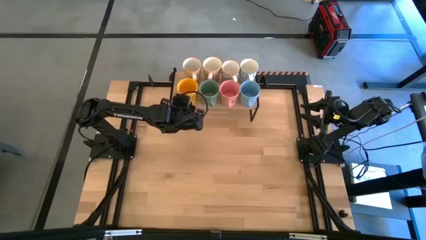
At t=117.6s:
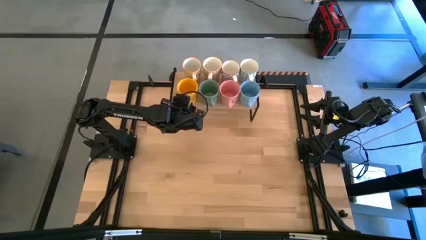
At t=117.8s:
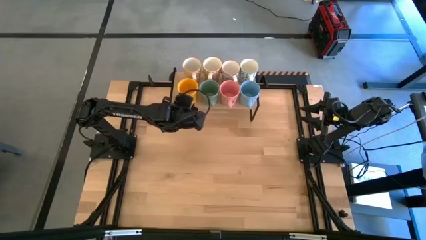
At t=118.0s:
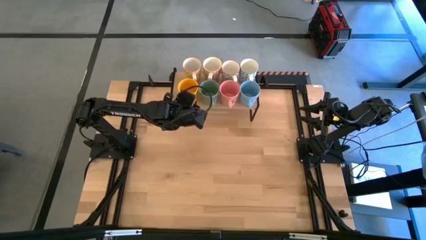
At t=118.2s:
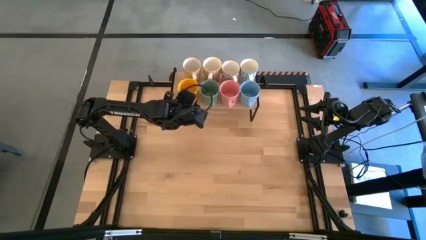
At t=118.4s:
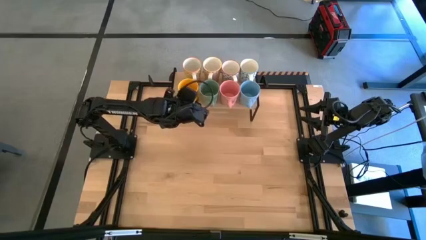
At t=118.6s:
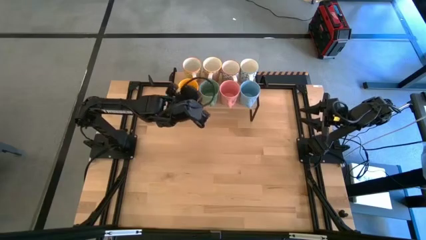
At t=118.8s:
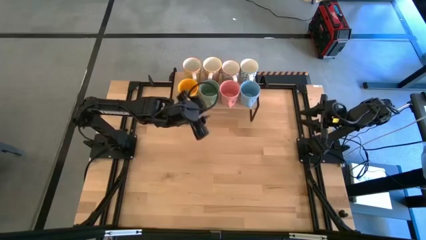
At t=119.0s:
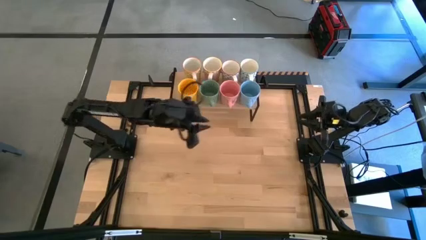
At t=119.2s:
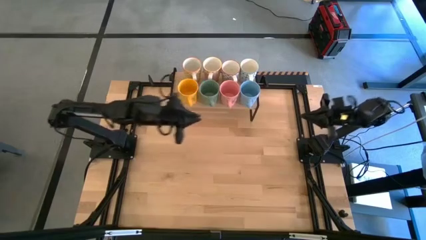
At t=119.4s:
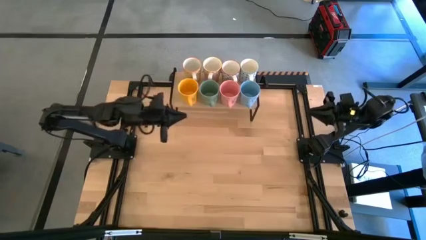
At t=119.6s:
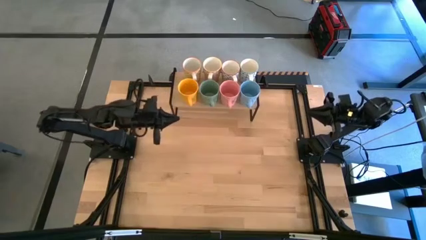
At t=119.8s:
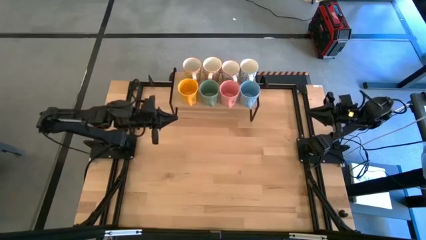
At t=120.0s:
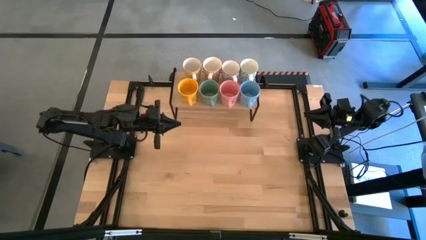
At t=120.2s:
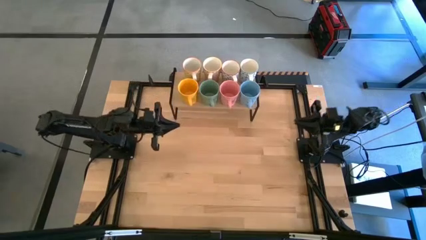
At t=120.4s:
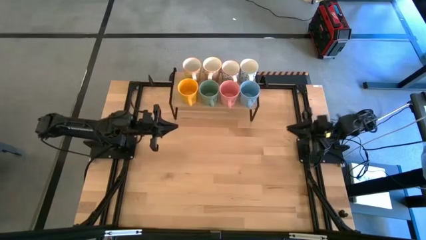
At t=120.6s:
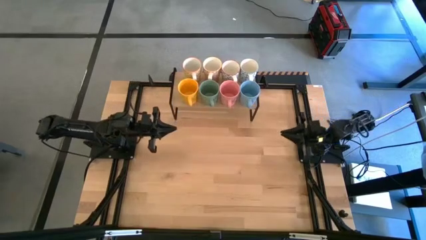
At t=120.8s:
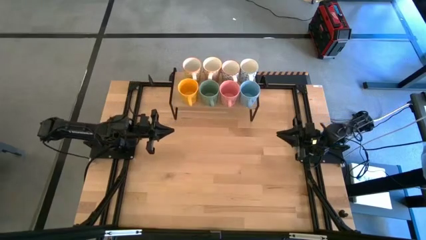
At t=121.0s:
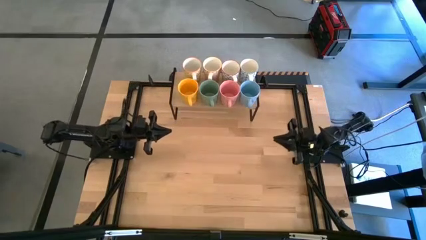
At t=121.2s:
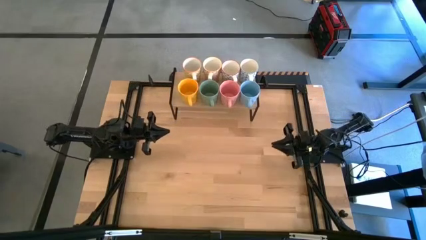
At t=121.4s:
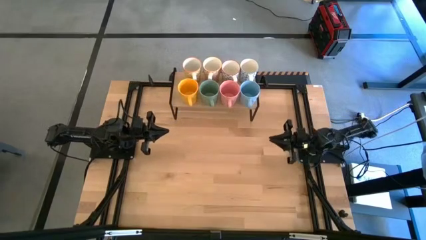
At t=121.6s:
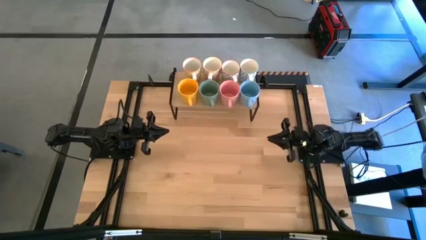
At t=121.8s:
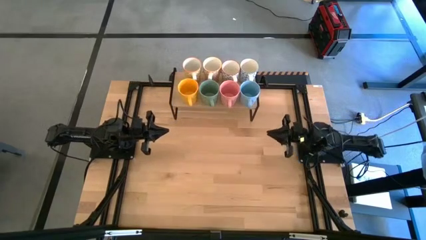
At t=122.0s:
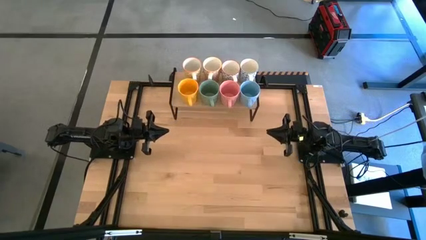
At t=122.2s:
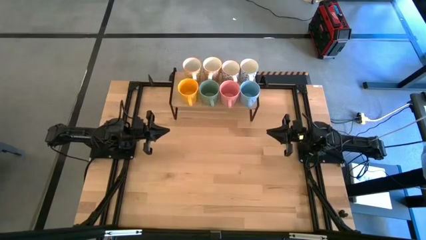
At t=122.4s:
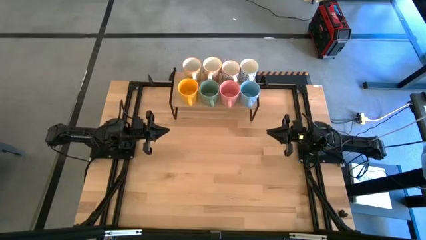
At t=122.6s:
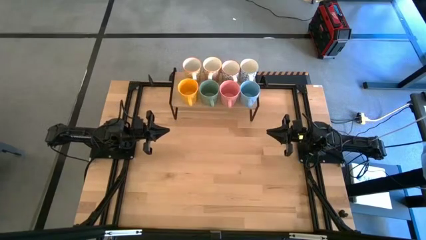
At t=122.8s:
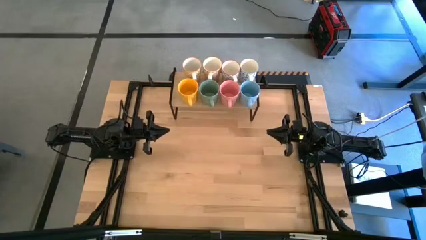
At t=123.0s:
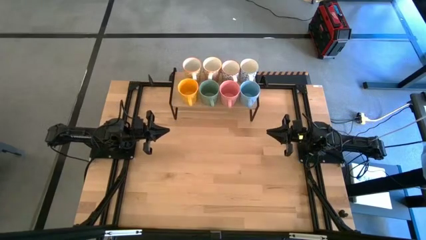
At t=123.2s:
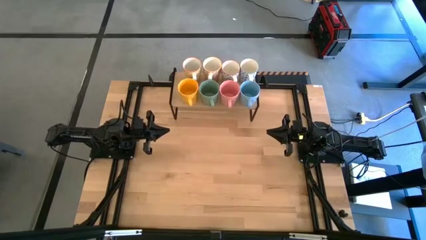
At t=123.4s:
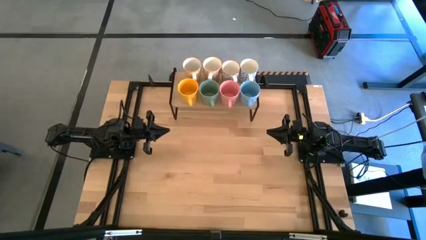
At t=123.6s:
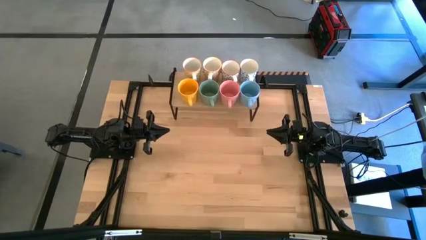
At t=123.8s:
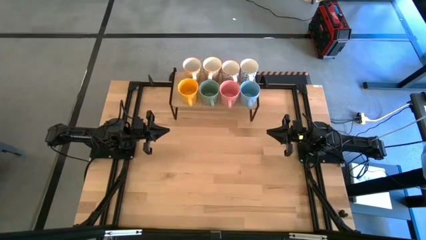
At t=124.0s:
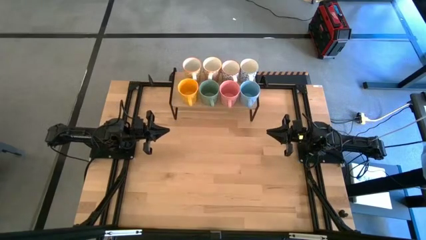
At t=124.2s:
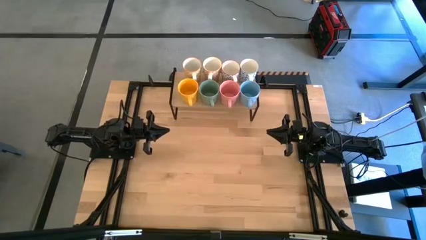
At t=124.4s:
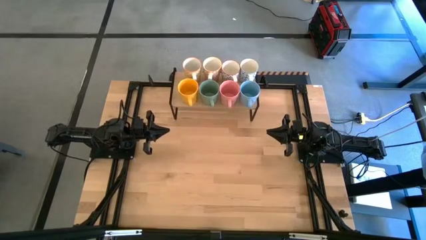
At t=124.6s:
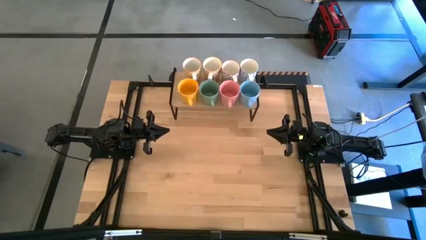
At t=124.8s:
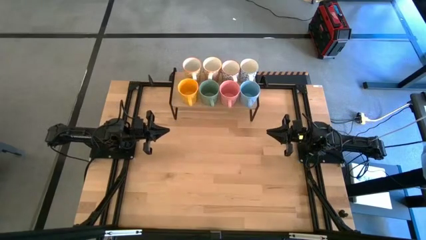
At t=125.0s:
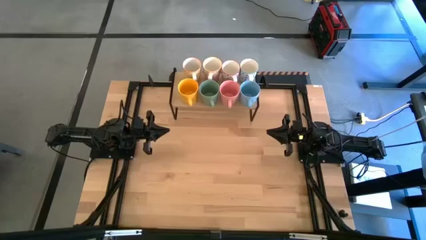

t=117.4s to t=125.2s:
Task: Place coffee mugs
Return to Home Position

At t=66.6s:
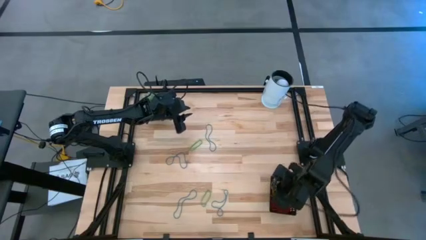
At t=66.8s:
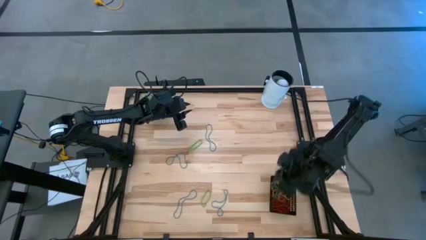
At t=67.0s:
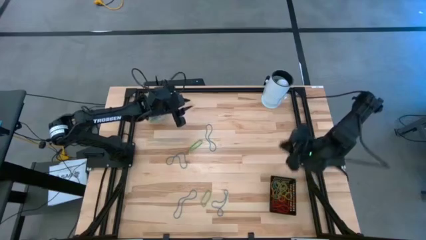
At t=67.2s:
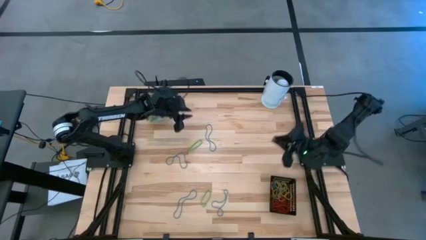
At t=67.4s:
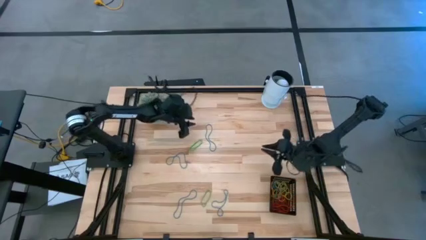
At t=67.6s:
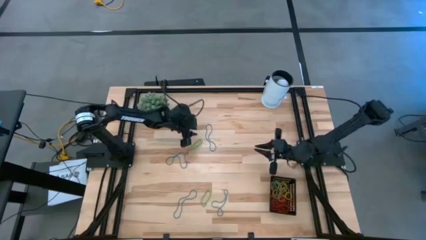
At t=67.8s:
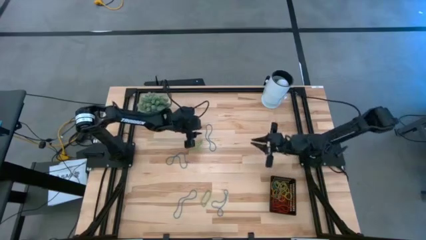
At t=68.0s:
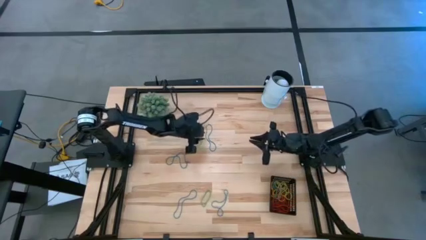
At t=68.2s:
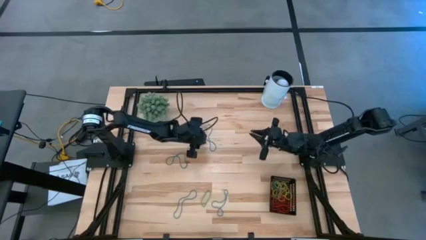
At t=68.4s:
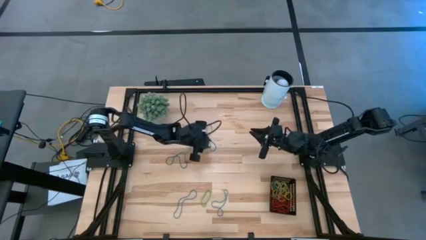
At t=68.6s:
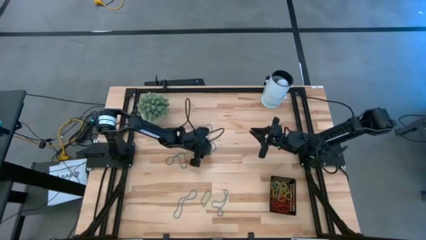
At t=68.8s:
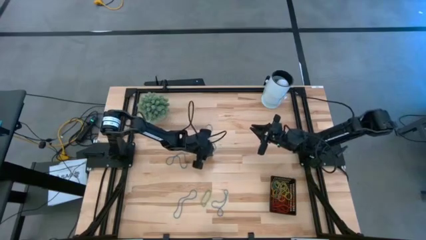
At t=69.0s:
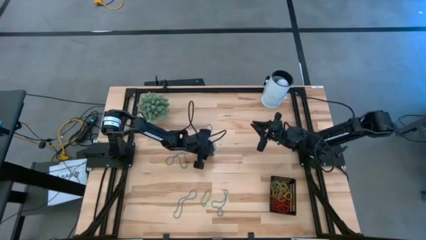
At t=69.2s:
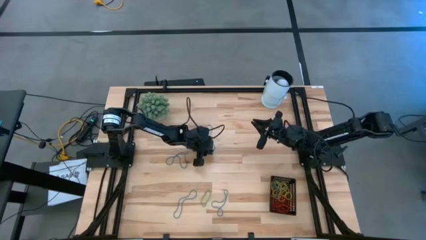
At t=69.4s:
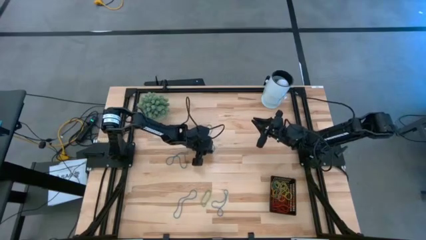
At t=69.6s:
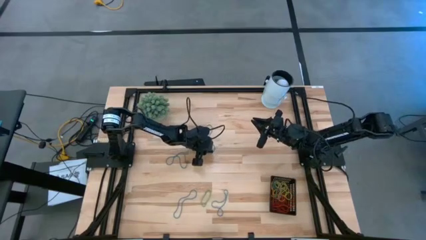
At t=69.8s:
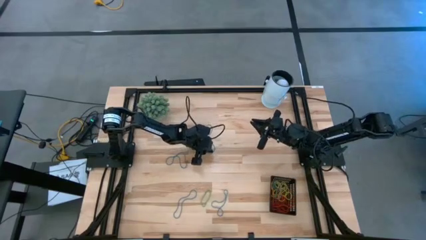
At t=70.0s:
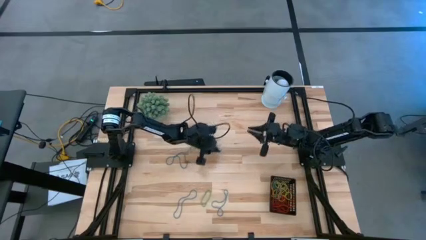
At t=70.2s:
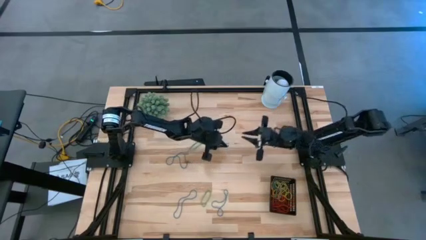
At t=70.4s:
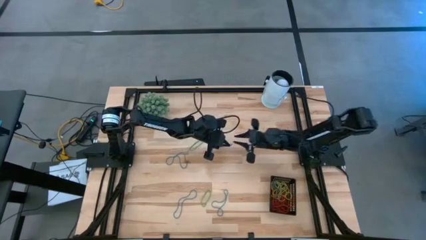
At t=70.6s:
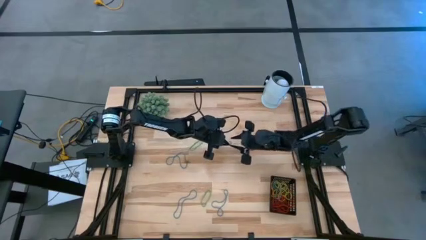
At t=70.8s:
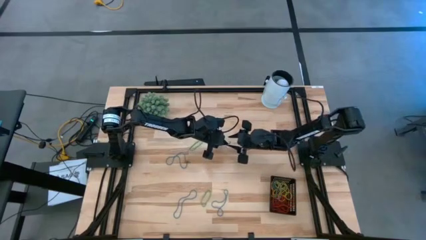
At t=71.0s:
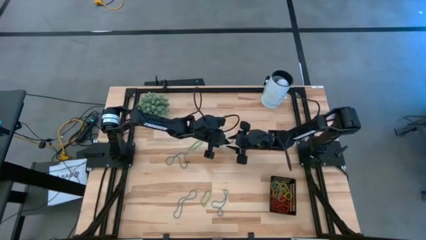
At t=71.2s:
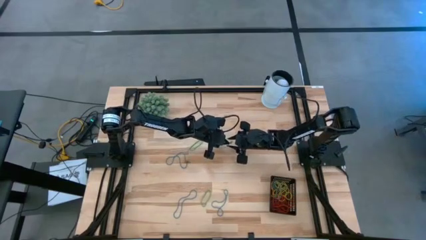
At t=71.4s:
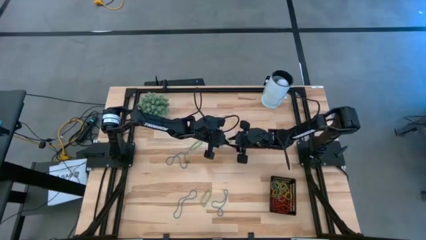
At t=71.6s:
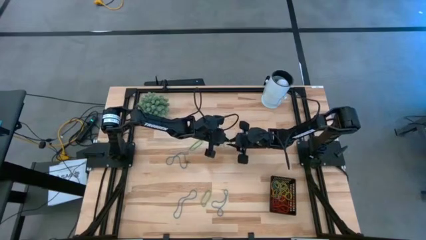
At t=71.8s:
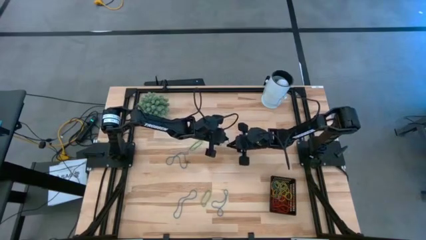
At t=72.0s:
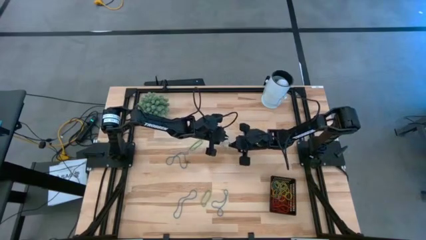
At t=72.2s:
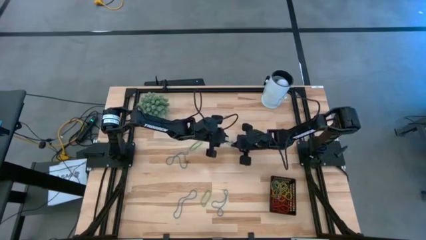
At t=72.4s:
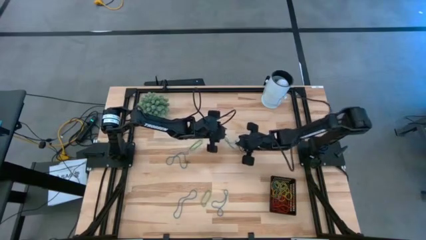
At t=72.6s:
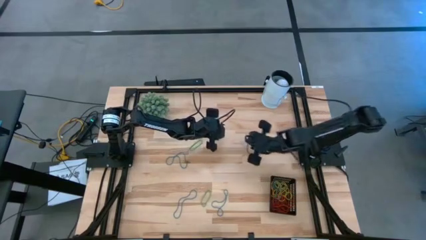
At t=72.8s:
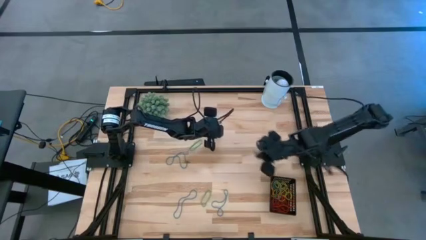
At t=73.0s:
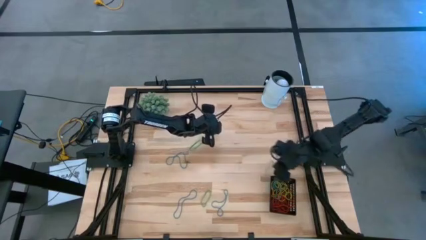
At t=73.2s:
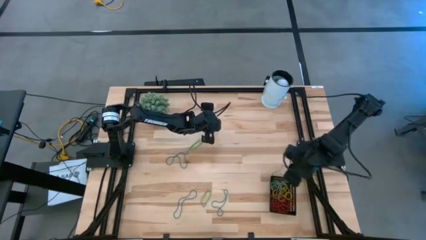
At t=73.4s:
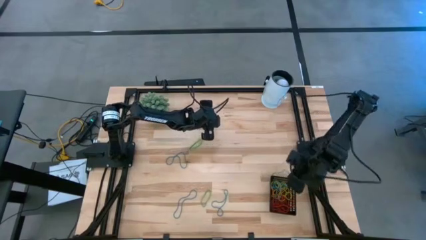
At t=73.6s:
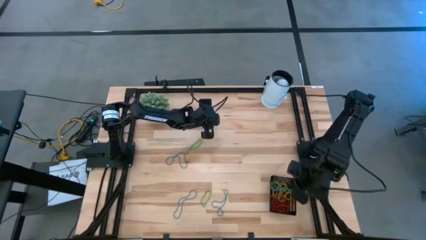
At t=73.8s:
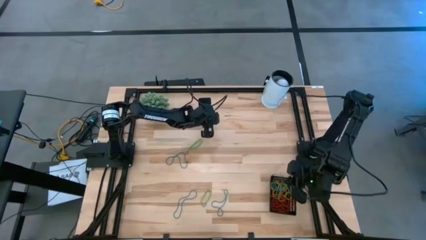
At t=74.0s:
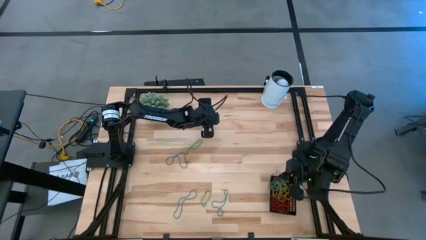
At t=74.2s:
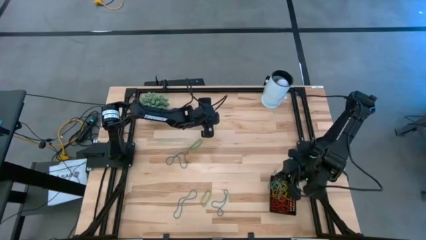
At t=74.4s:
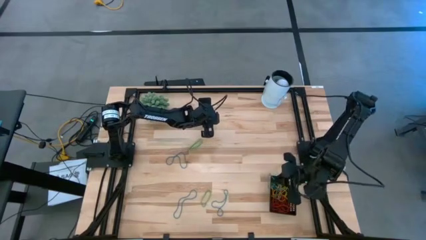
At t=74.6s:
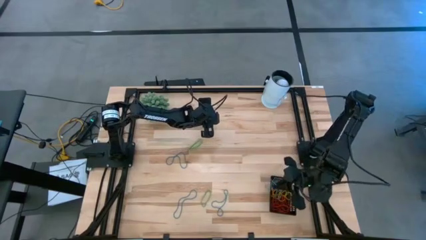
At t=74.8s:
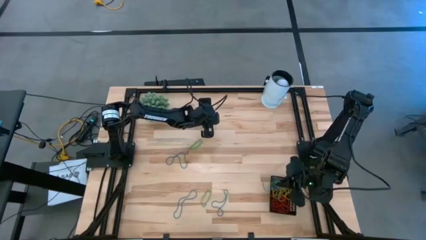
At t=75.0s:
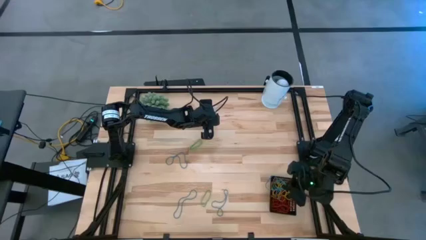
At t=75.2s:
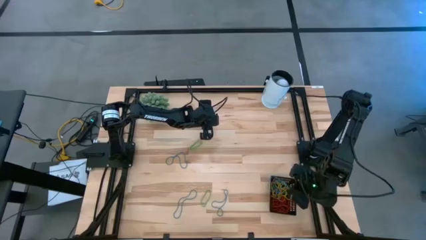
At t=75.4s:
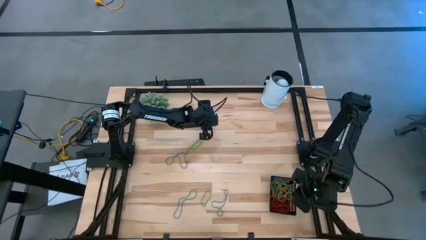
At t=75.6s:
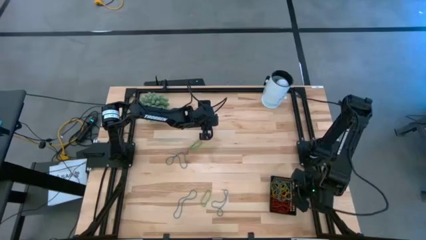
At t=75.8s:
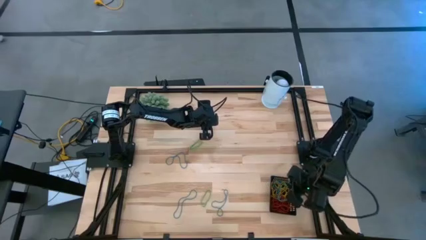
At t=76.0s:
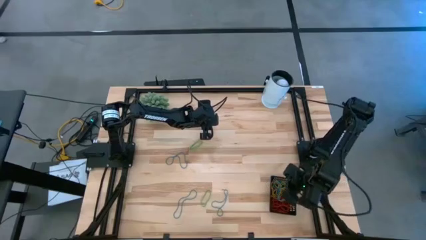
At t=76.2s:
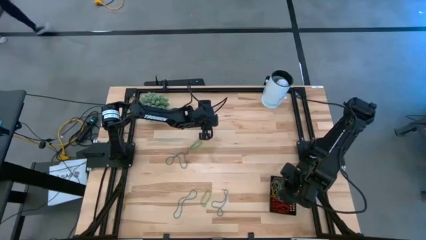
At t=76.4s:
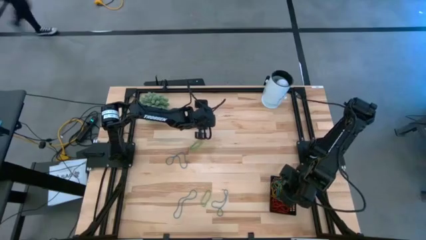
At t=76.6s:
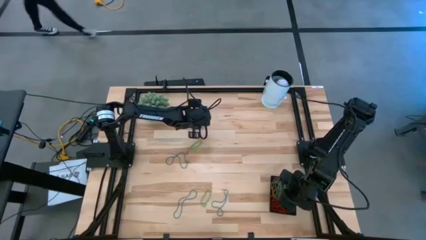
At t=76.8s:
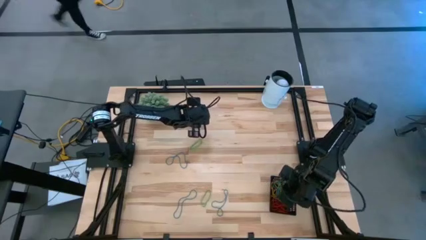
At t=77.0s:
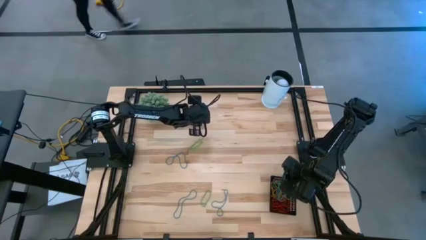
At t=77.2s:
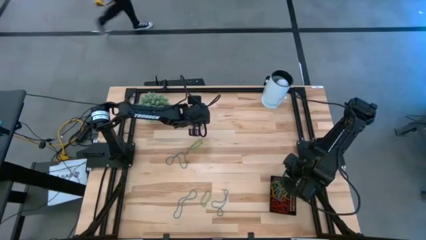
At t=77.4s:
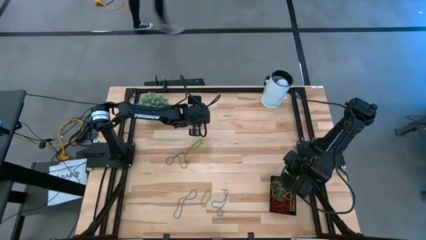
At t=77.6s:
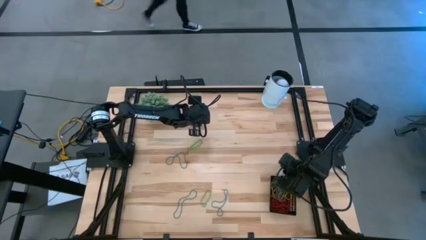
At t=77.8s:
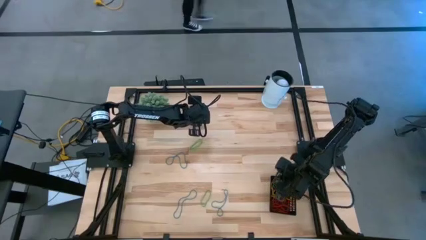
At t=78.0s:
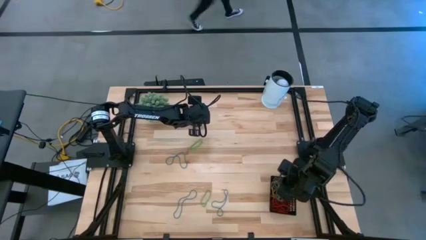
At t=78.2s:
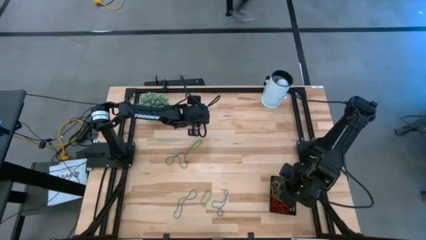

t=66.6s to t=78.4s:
Task: Pick and place items into bin
Put the top blue rubberband into the black basket
